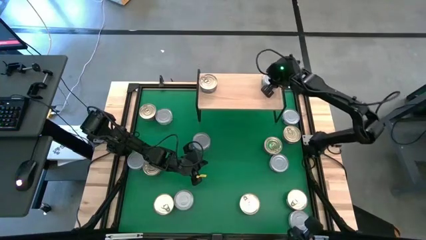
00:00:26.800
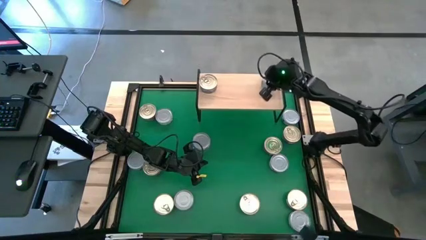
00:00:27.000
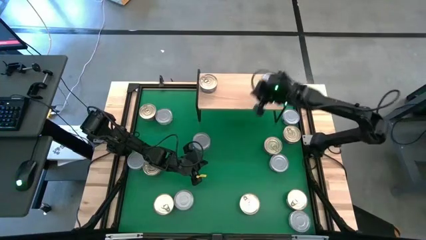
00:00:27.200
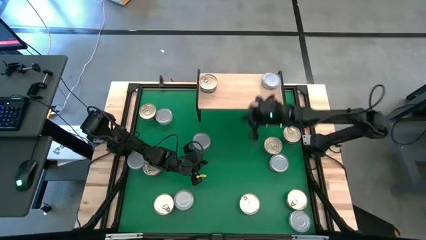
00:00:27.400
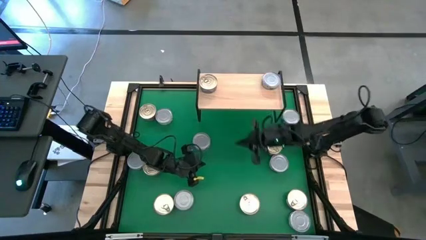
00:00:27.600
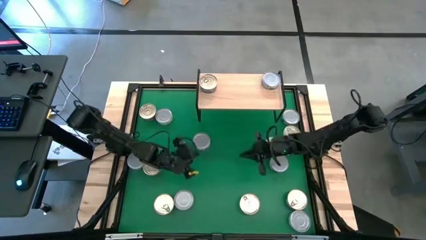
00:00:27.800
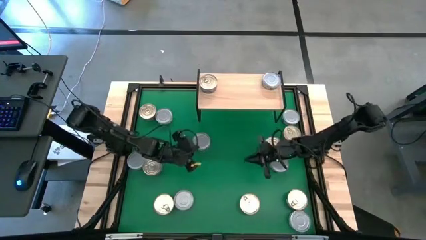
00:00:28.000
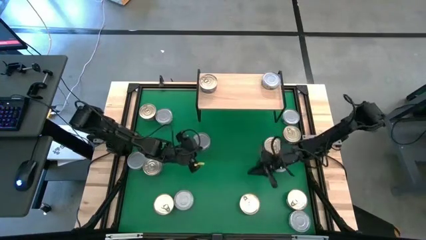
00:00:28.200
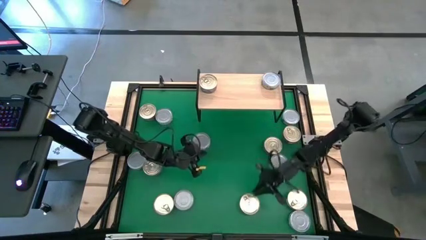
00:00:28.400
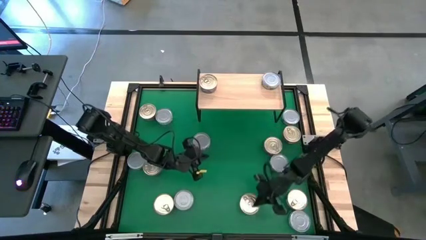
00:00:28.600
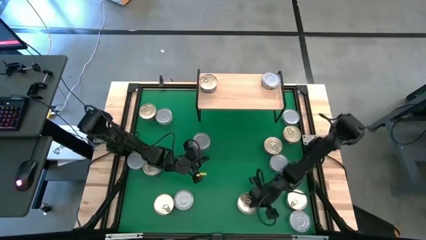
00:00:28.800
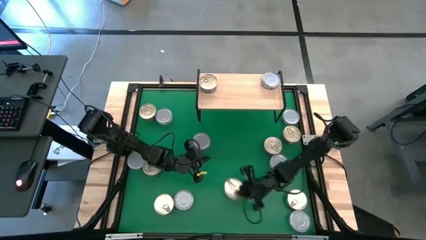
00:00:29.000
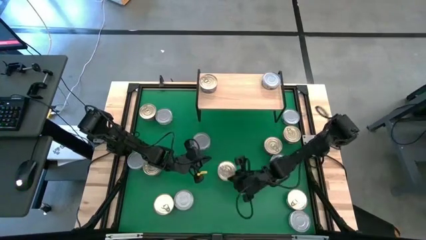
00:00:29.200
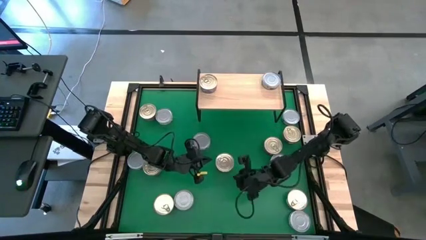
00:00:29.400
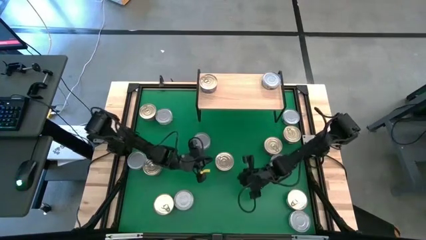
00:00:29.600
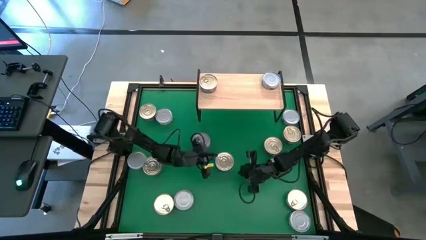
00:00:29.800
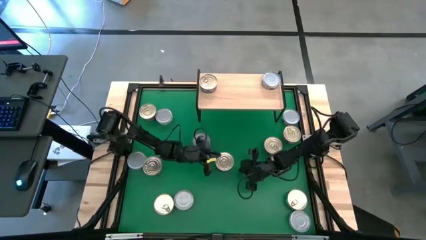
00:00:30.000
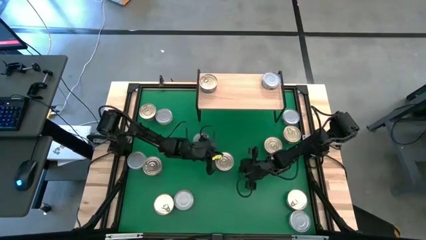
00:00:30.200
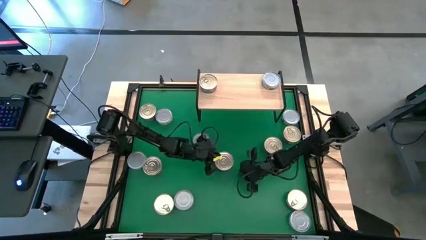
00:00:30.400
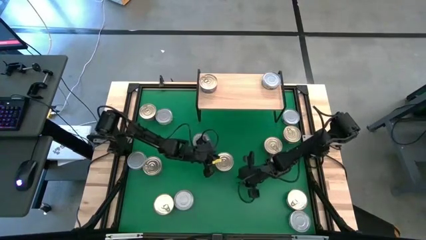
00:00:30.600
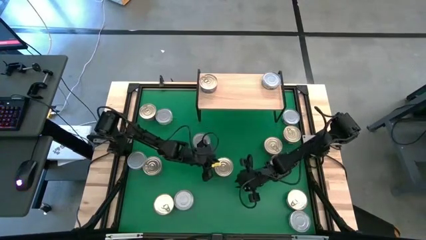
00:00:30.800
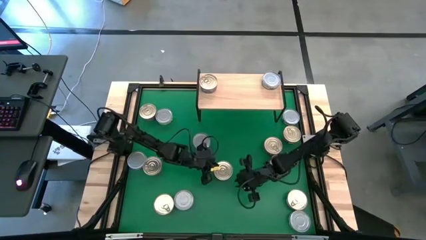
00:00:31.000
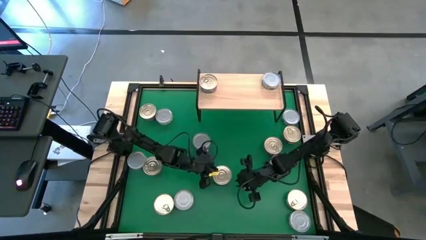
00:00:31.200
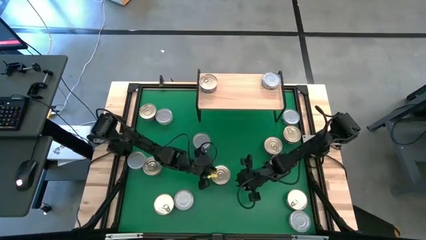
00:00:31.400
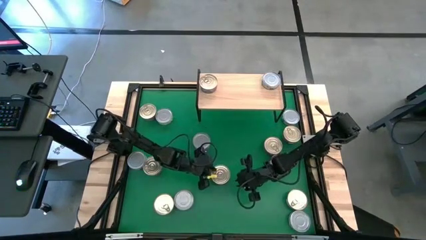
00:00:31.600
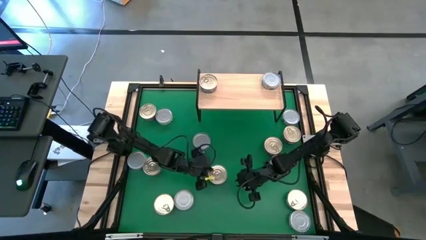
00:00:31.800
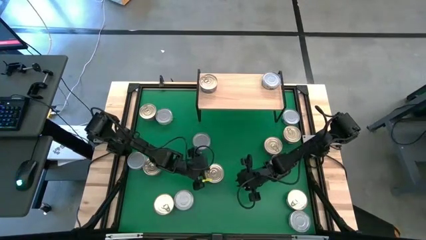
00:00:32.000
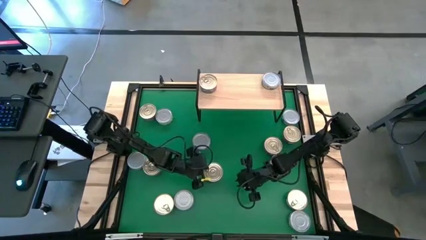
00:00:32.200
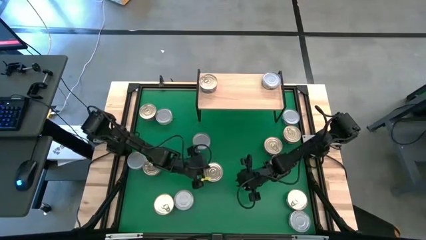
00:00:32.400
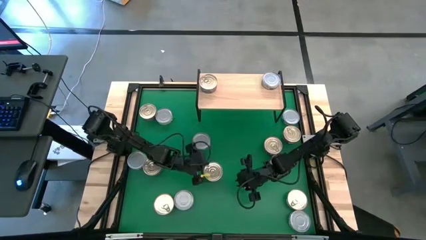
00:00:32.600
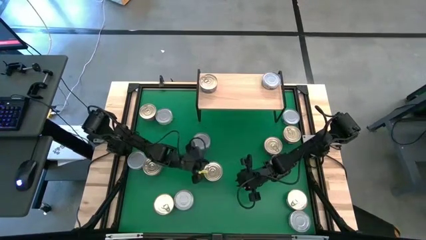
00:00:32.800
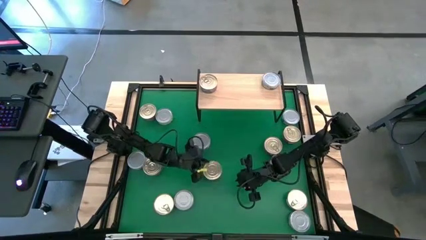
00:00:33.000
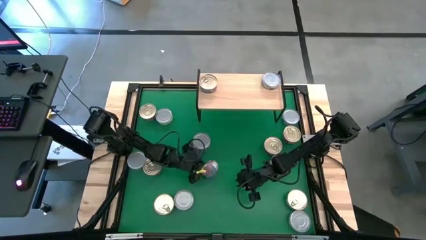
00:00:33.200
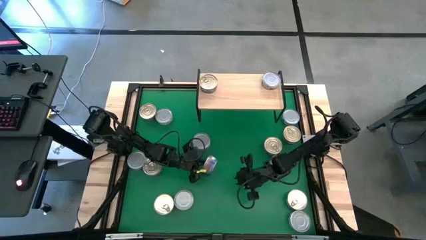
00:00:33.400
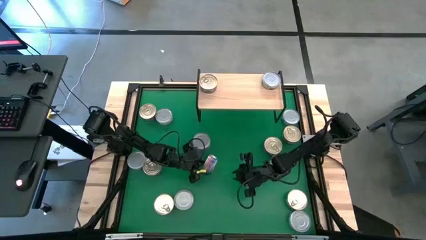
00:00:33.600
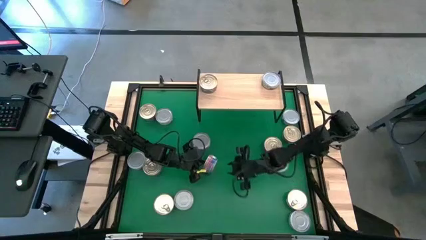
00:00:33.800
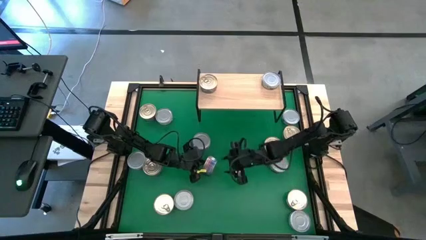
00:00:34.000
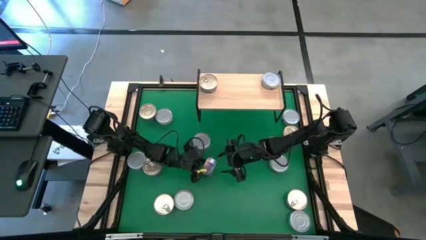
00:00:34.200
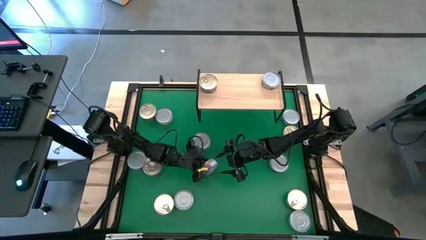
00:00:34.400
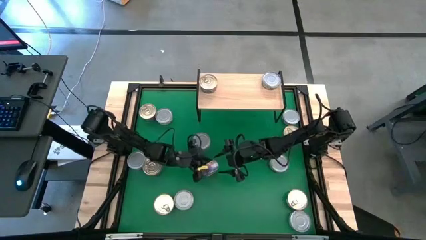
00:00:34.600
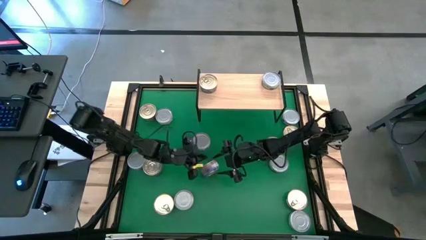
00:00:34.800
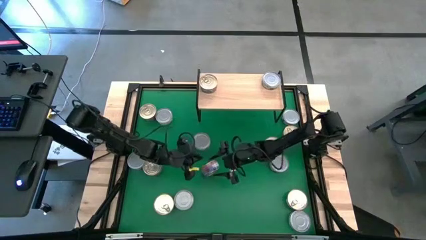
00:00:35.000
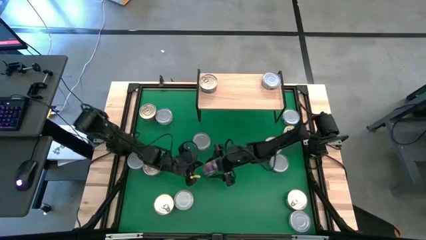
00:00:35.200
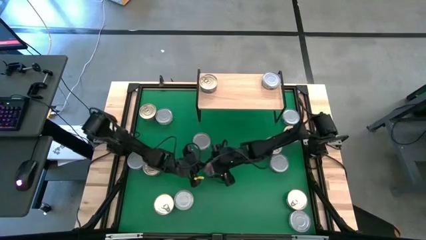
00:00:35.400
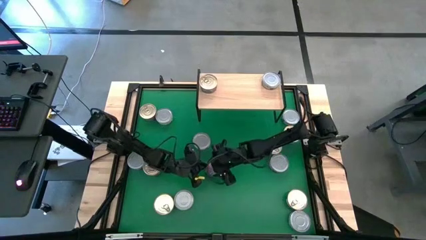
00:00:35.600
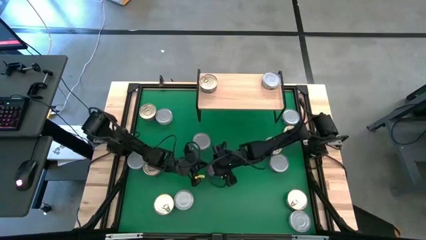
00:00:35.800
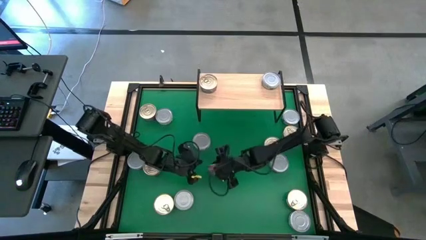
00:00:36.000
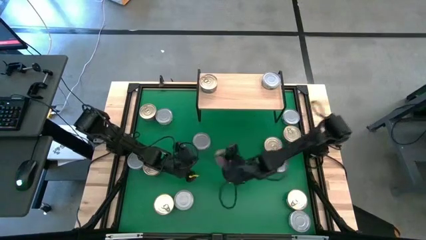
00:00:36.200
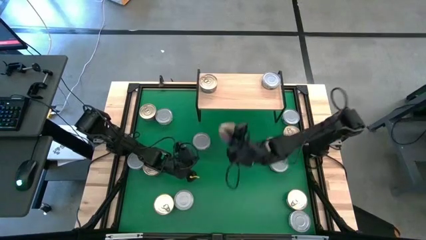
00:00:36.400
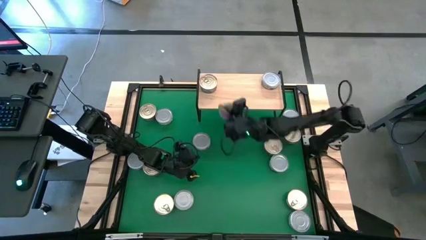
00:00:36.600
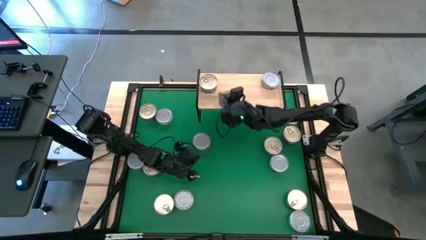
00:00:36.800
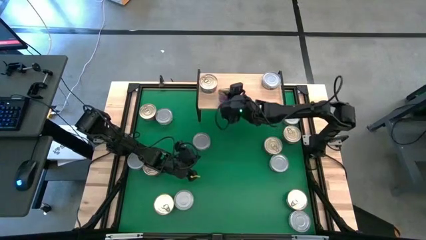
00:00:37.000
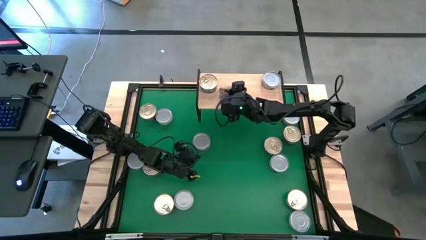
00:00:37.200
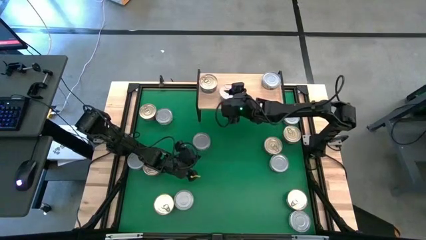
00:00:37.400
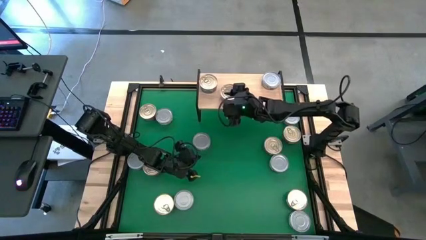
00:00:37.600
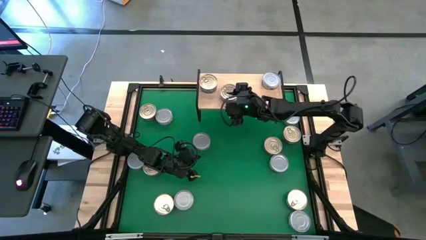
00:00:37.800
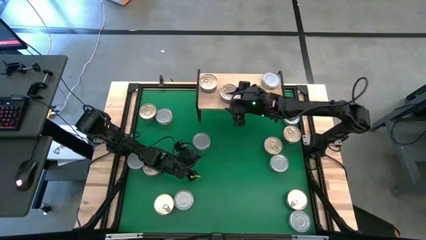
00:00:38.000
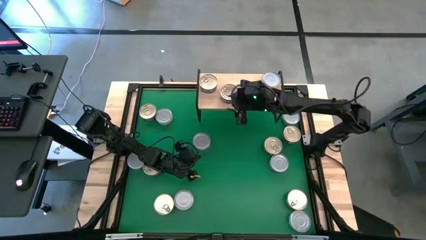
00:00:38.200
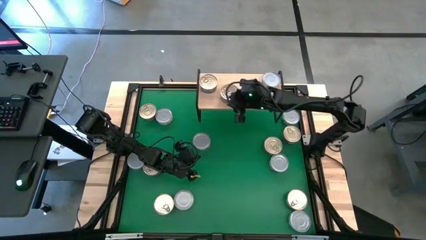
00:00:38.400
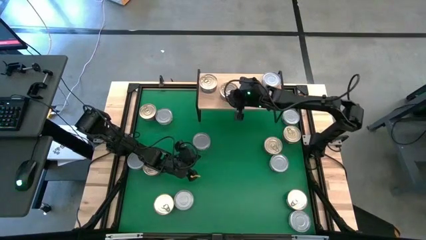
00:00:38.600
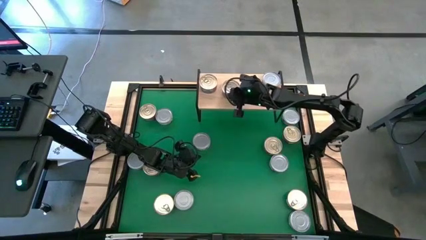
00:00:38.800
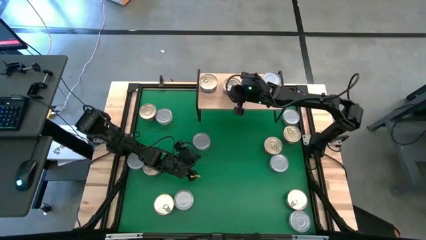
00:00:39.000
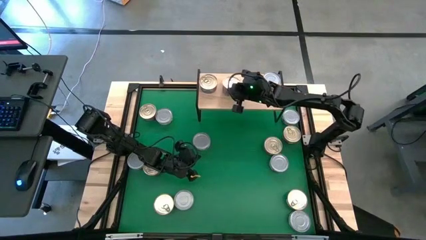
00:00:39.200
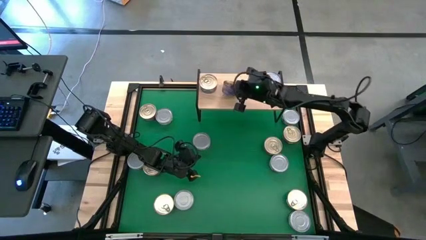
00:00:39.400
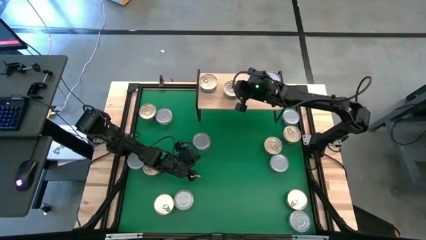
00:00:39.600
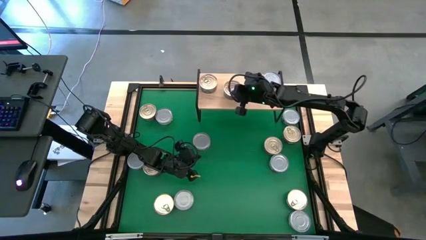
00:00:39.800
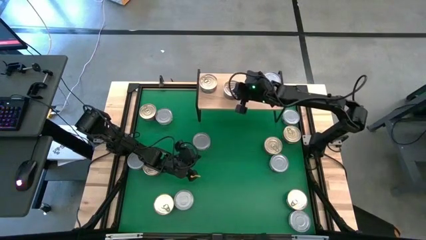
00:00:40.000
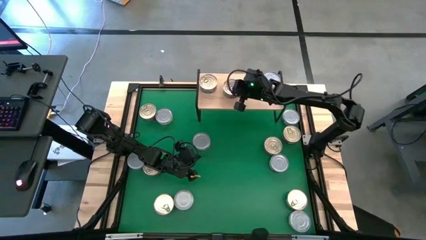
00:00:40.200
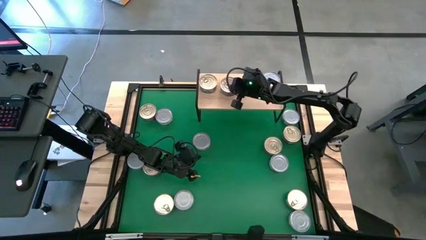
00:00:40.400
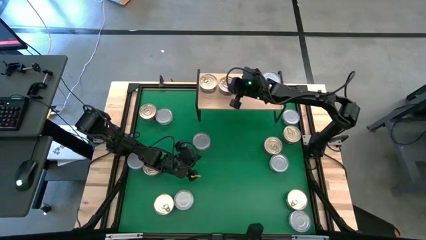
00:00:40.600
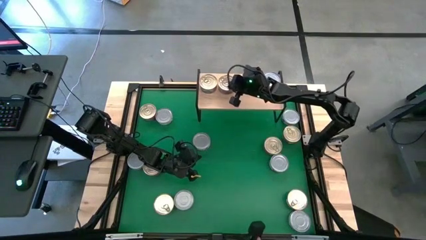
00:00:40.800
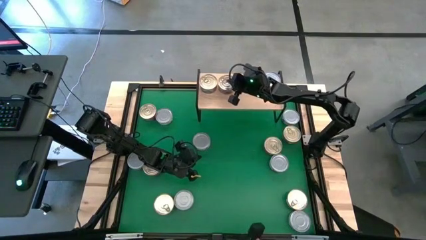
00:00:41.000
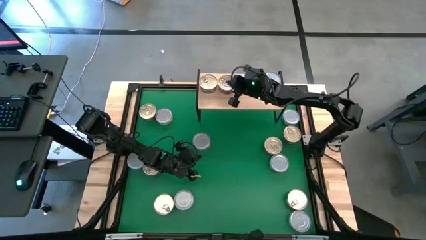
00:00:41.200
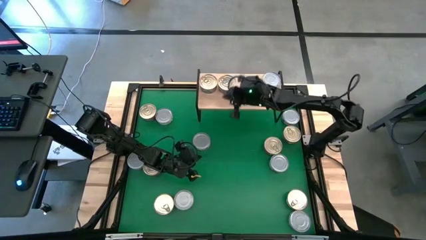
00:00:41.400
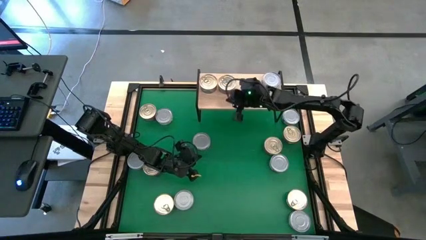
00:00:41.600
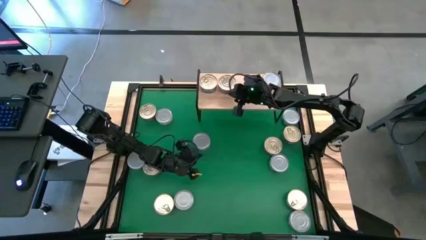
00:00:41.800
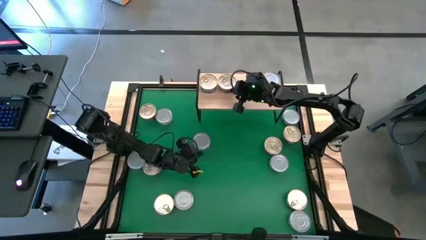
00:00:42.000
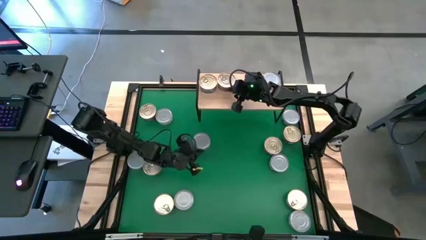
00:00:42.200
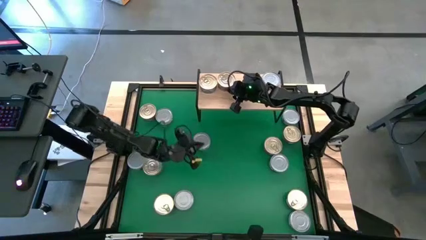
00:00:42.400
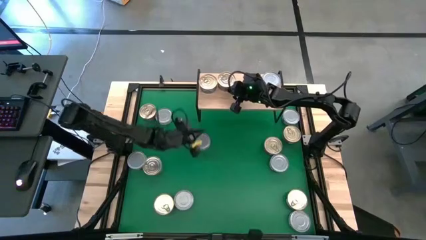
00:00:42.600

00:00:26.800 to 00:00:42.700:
Task: Stack canned seafood by type on shelf
Put the blue pink tuna can on the shelf

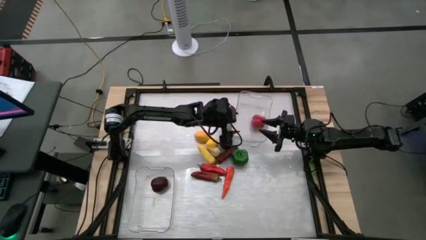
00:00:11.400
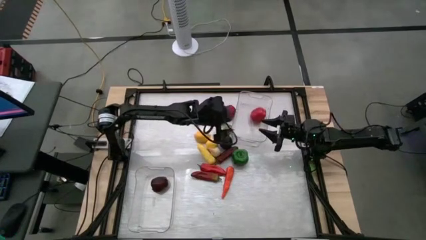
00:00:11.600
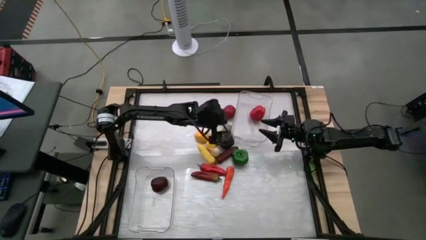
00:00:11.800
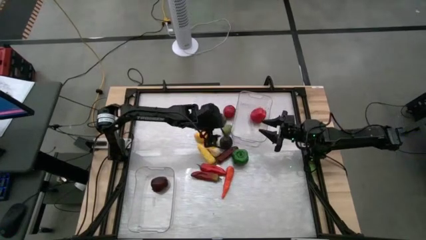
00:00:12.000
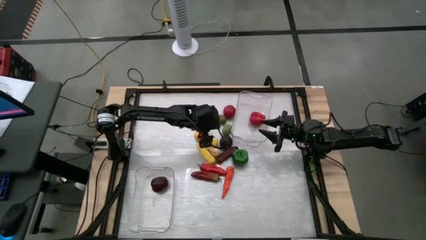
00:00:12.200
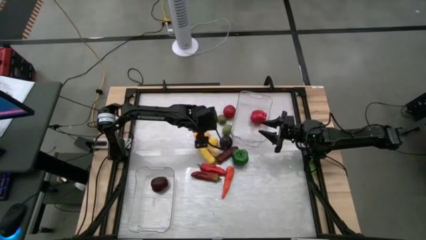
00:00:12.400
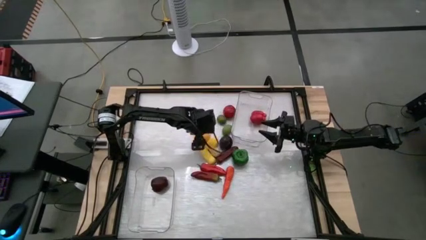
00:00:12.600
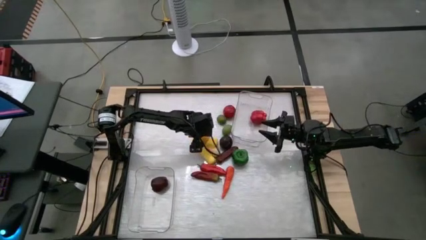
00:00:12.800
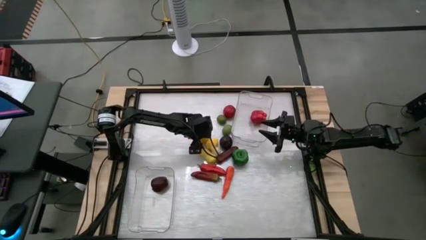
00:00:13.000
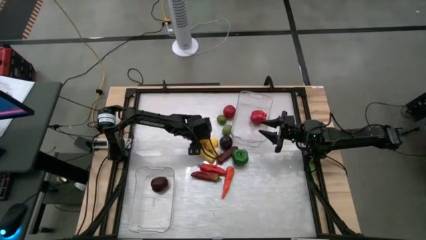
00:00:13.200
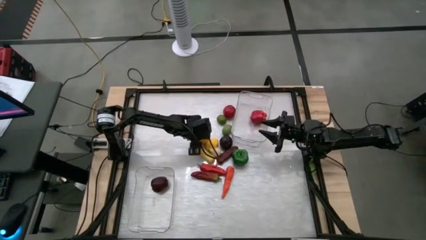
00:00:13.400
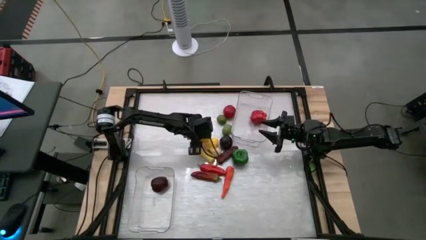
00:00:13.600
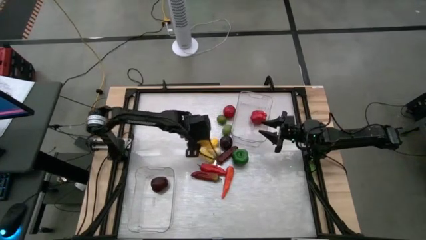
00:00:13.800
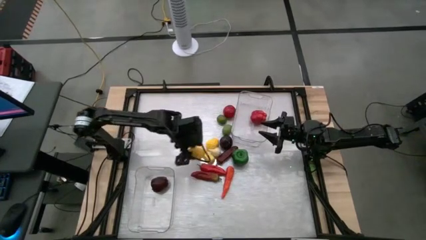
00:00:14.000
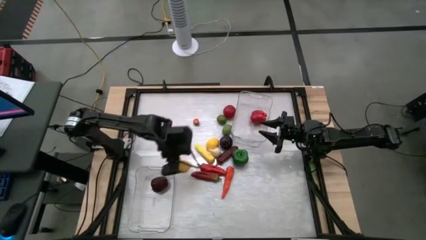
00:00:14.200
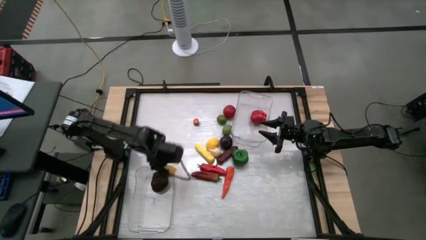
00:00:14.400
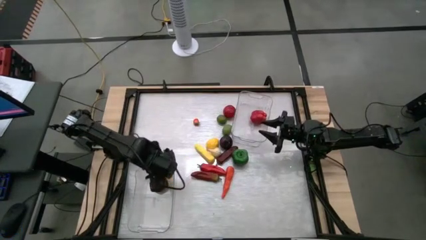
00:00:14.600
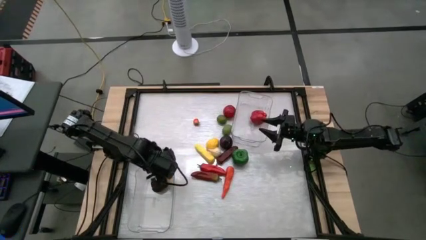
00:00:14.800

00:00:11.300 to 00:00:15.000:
Task: Sort produce into baskets
Put the left yellow lemon into the bottom transparent bin
